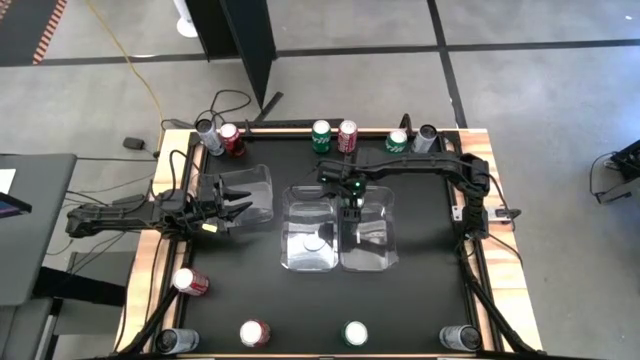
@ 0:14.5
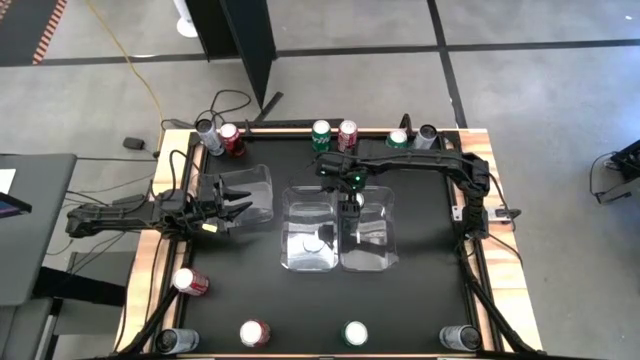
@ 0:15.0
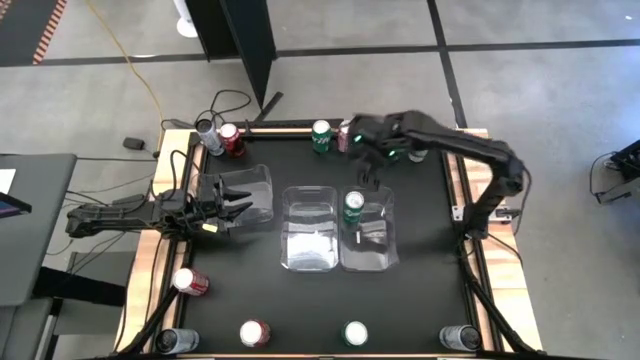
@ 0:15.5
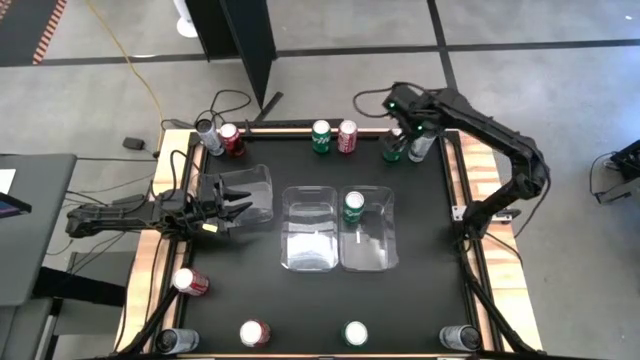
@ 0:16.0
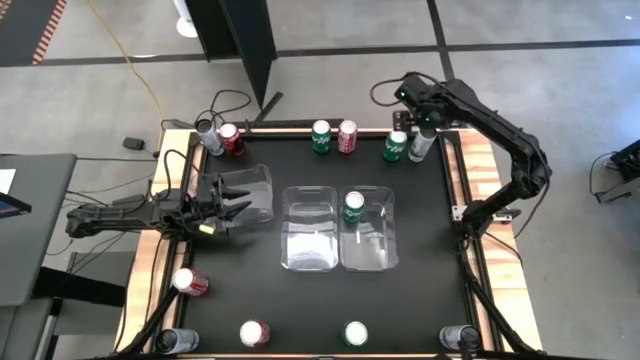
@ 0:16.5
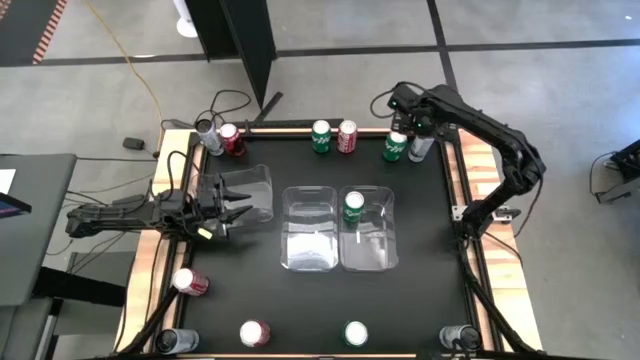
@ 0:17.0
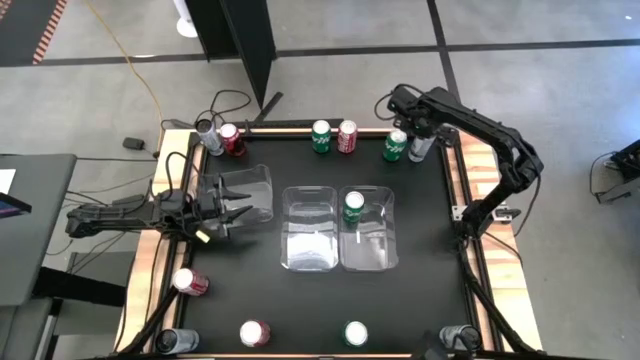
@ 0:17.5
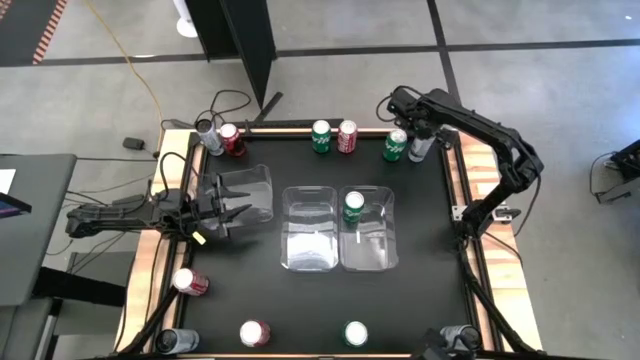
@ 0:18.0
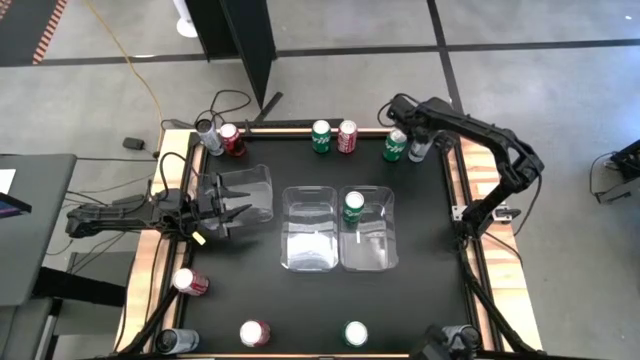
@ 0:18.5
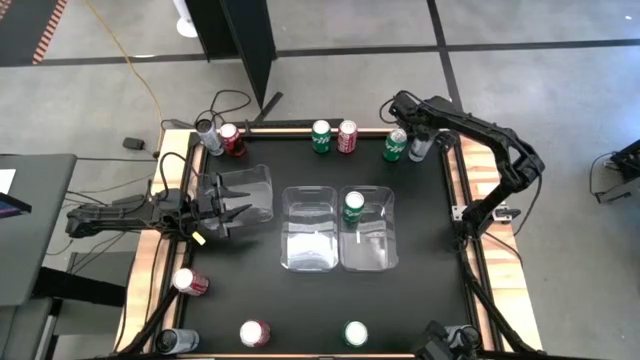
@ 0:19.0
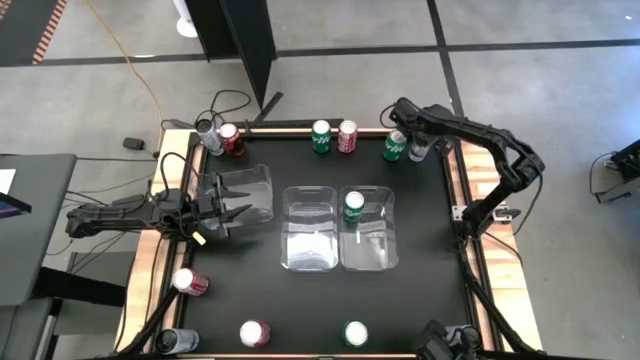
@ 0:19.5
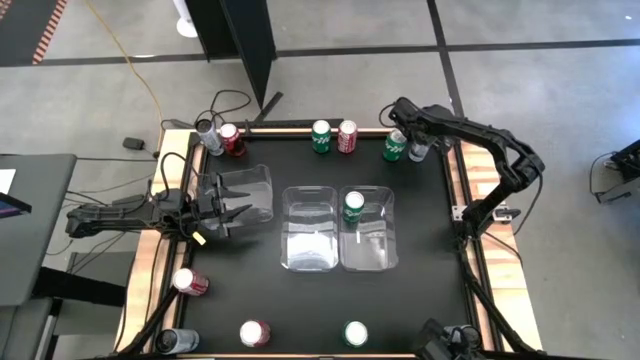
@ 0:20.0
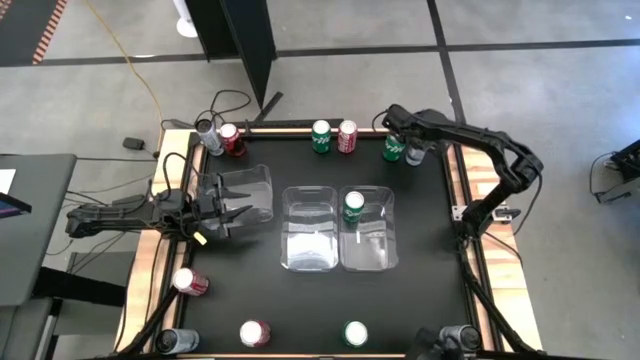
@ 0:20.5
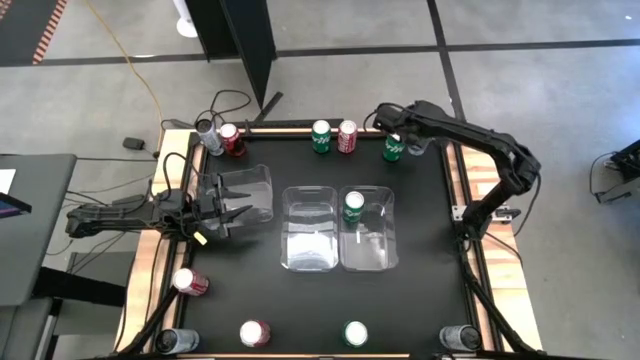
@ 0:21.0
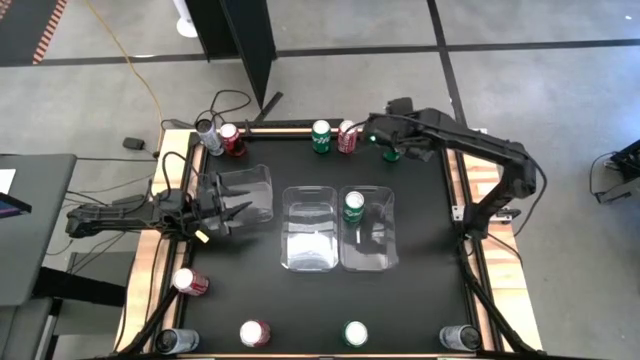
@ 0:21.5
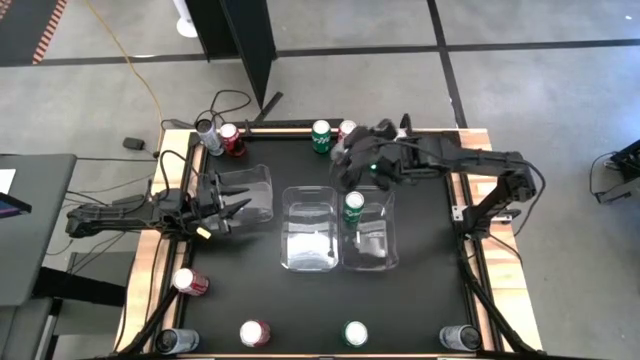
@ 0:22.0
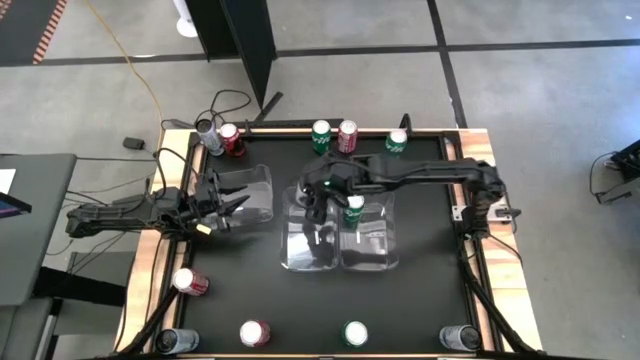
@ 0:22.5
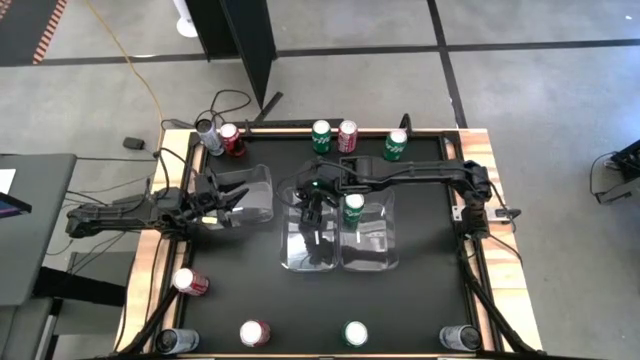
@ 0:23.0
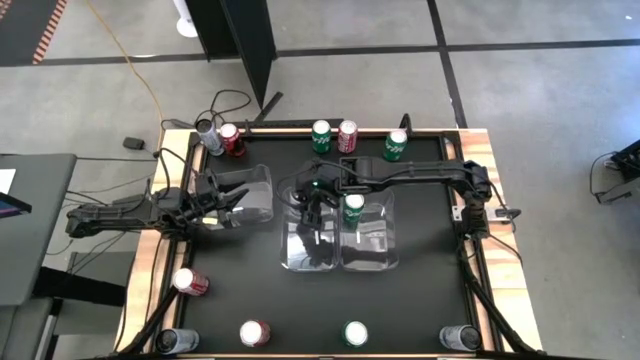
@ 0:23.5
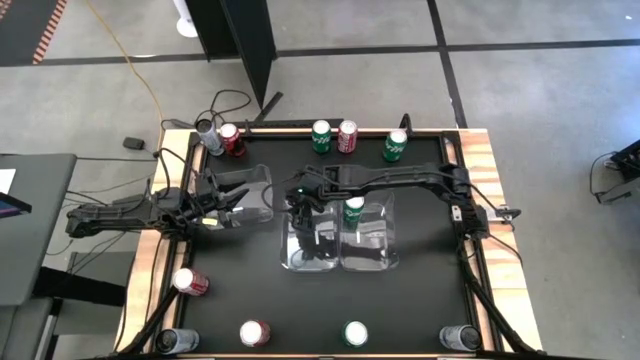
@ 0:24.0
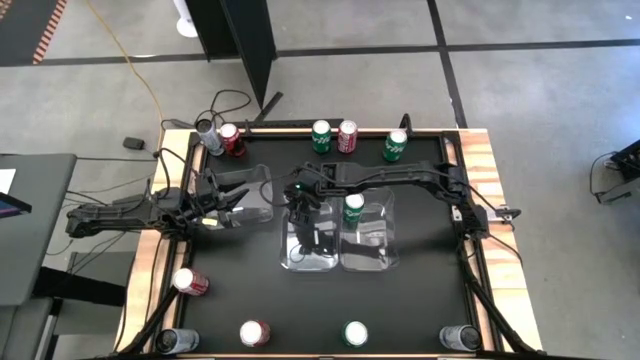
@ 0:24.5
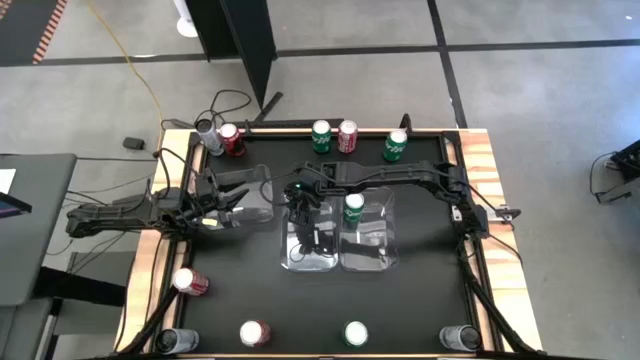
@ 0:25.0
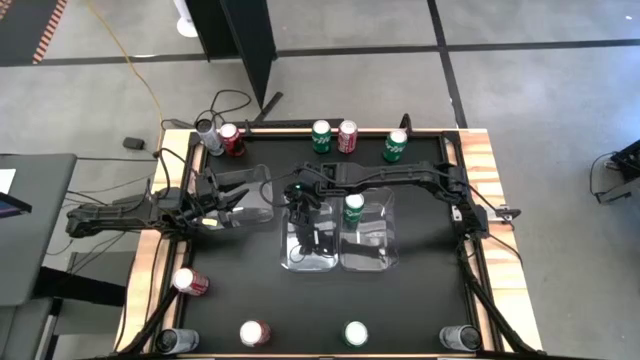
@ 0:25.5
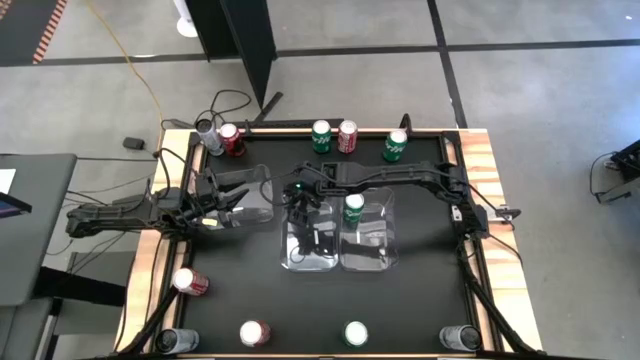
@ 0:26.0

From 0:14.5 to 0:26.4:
Task: Sort soda cans
Put the top right white and blue soda can into the center transparent bin

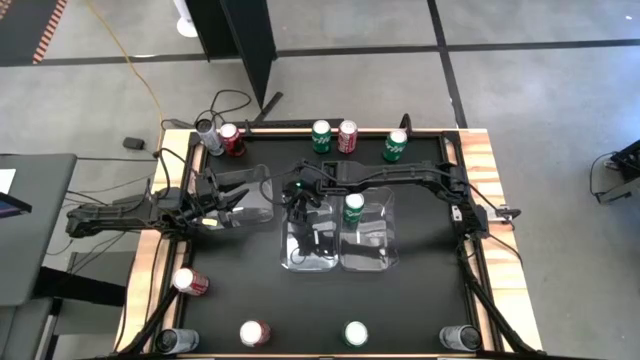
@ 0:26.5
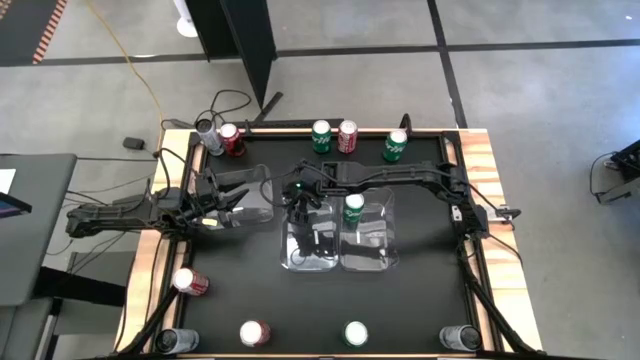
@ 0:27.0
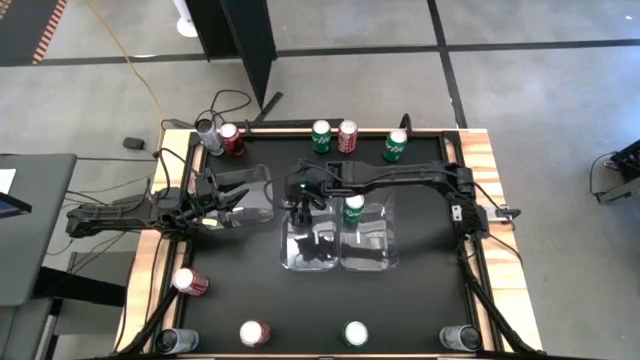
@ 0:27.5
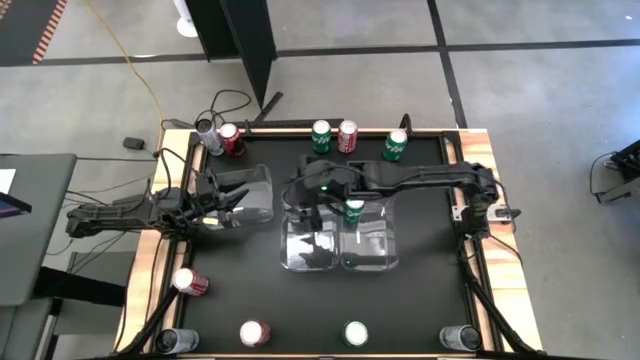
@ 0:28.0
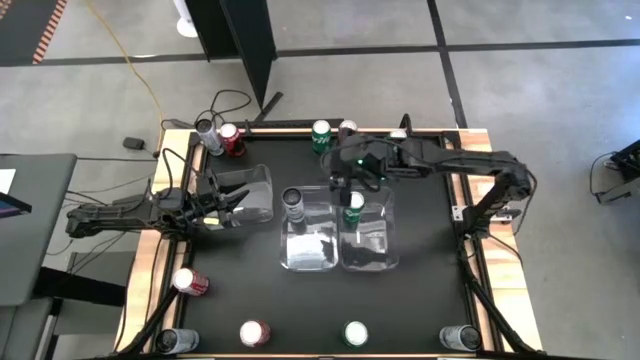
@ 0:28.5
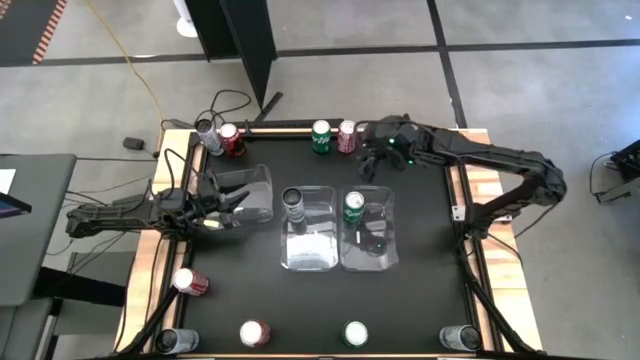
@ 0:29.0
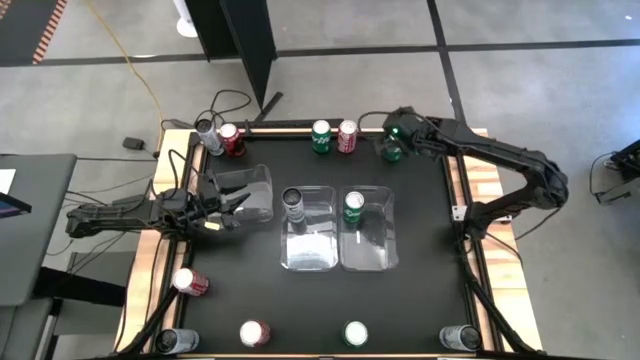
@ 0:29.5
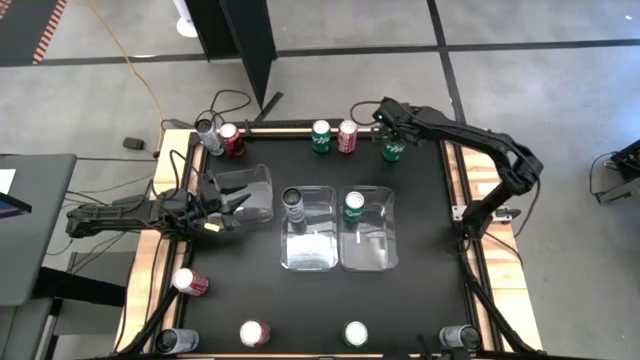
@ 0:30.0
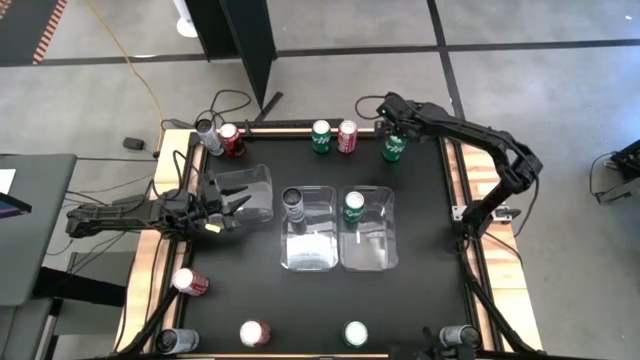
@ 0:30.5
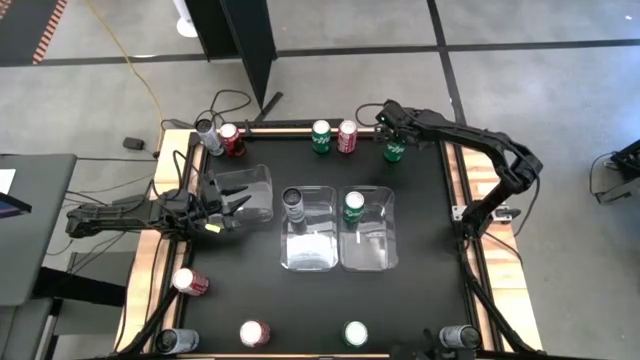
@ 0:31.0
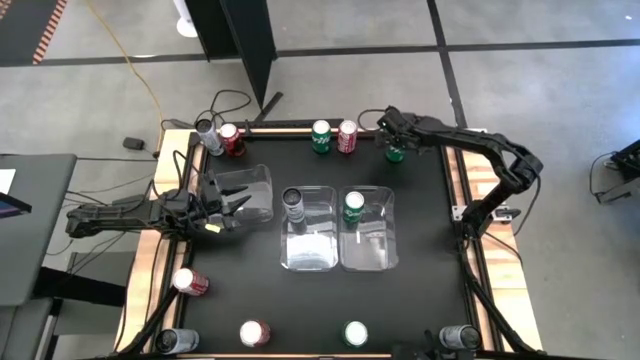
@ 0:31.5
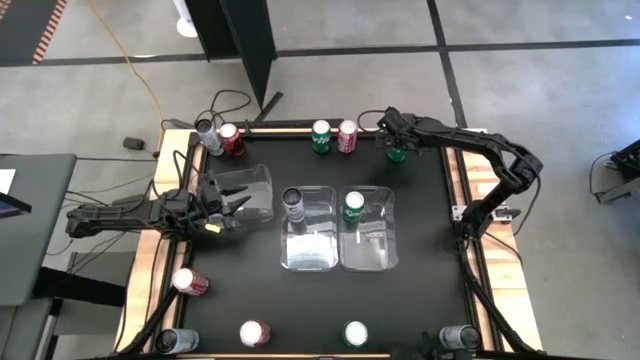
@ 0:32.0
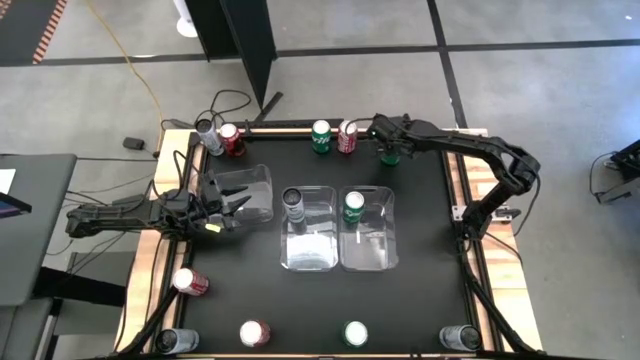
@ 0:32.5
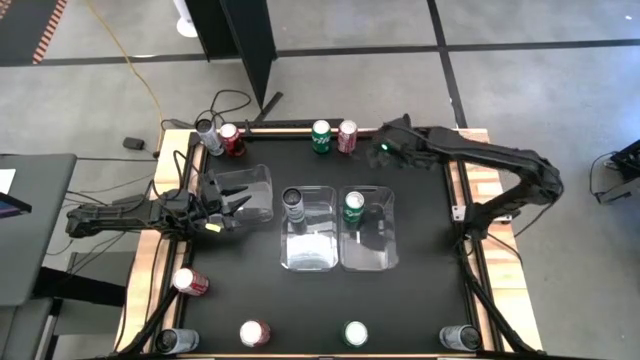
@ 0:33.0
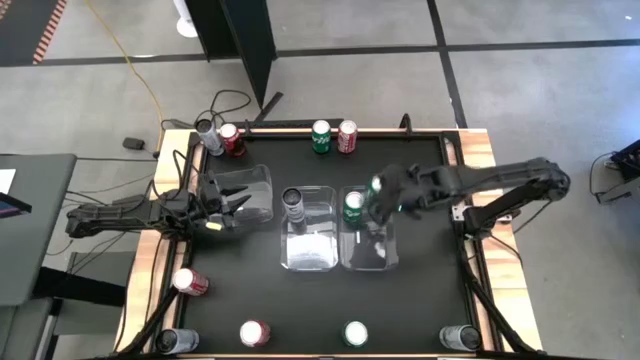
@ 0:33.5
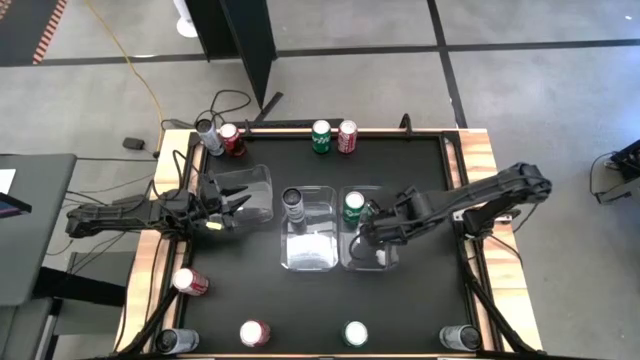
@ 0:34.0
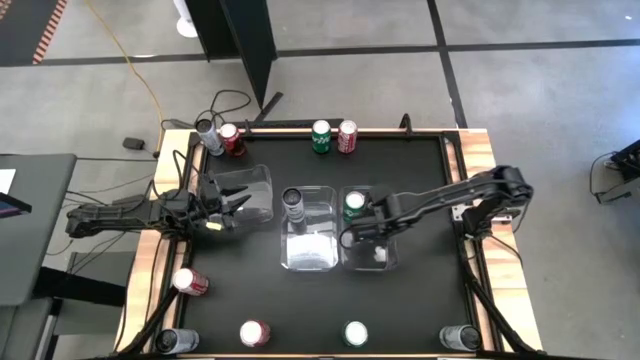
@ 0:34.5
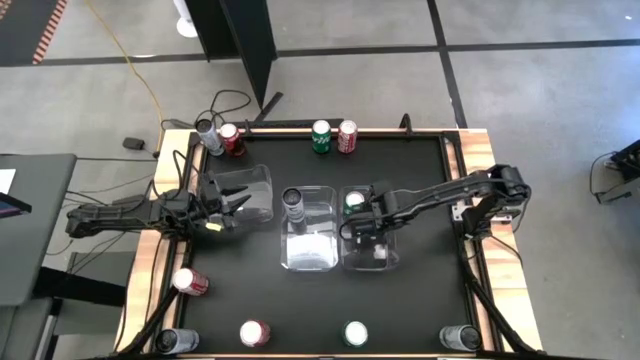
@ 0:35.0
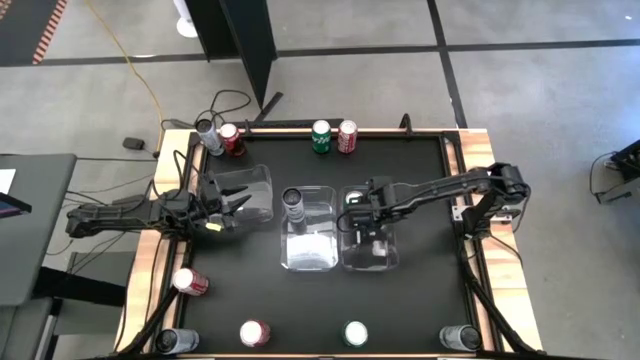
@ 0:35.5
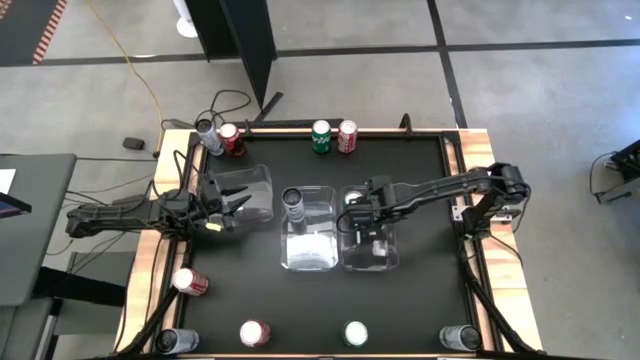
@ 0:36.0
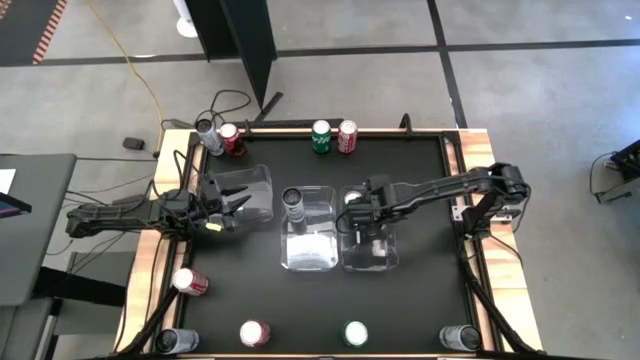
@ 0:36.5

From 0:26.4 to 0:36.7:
Put the top right green soda can into the right transparent bin
